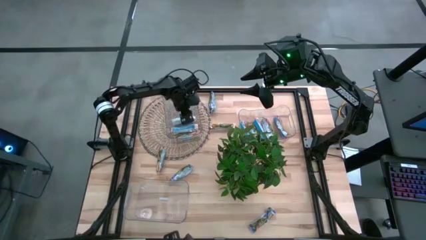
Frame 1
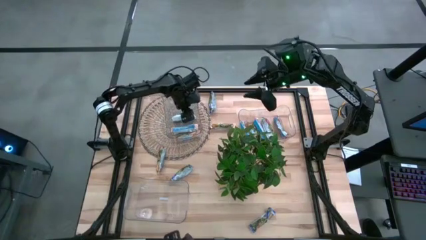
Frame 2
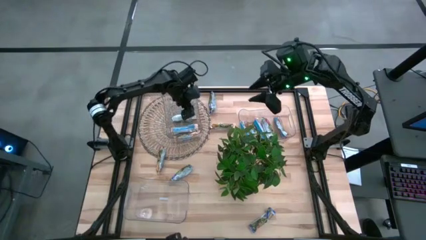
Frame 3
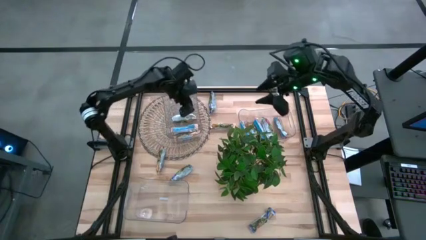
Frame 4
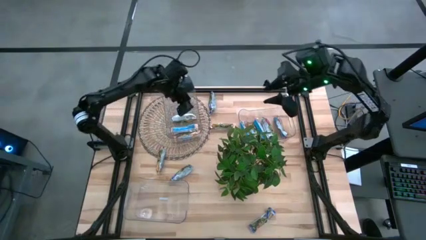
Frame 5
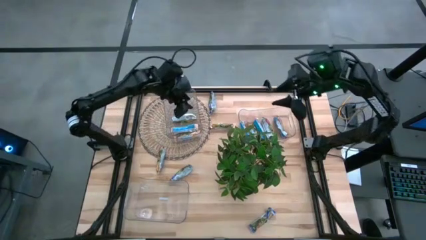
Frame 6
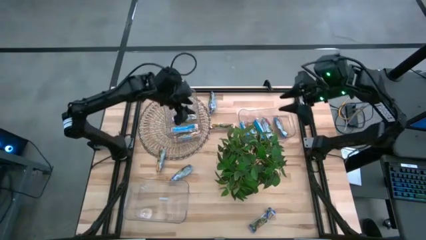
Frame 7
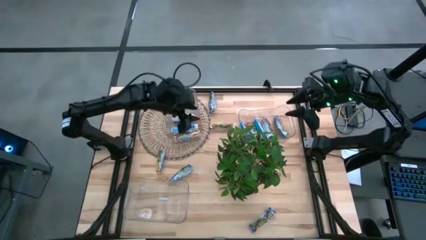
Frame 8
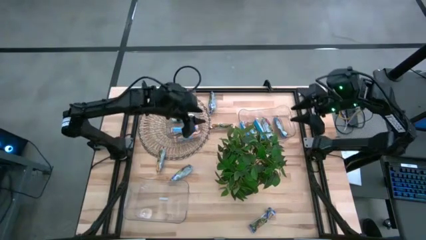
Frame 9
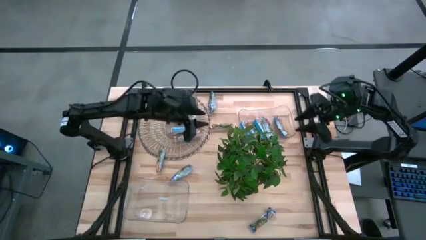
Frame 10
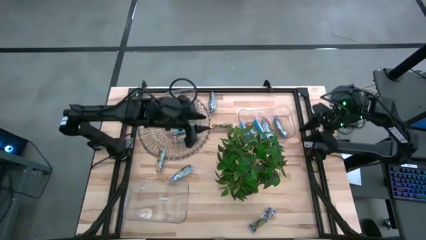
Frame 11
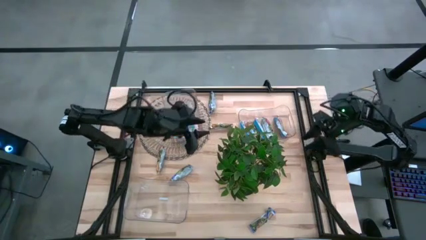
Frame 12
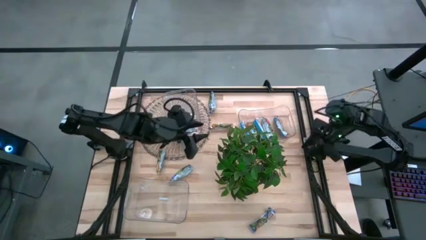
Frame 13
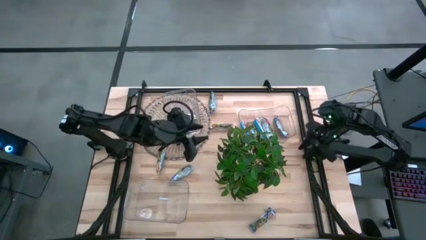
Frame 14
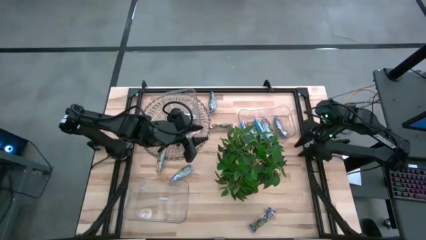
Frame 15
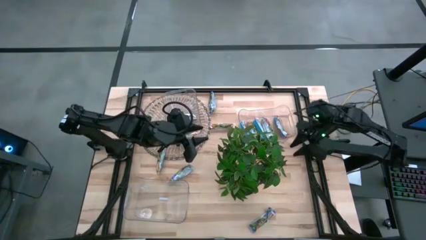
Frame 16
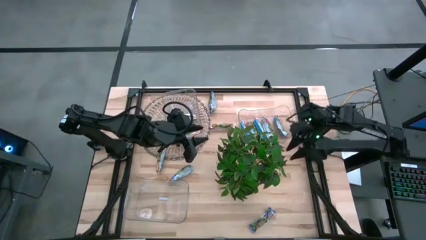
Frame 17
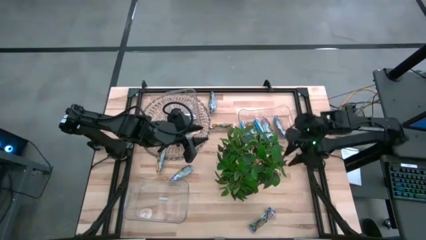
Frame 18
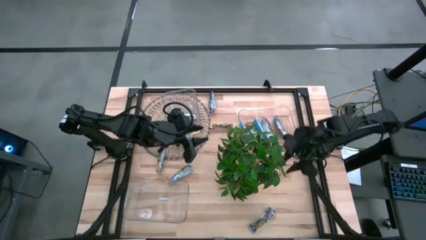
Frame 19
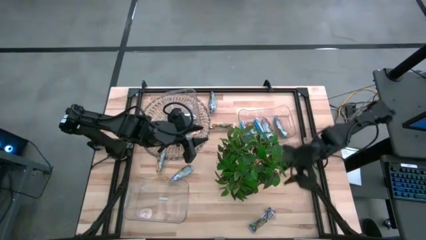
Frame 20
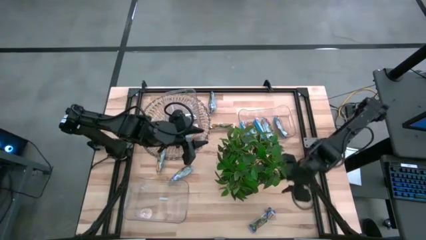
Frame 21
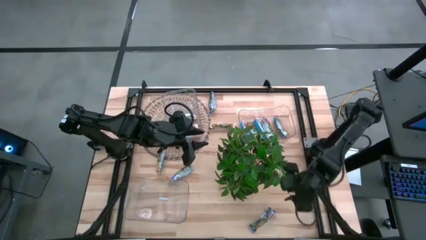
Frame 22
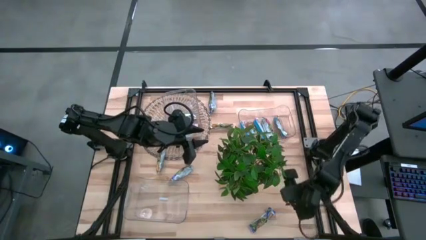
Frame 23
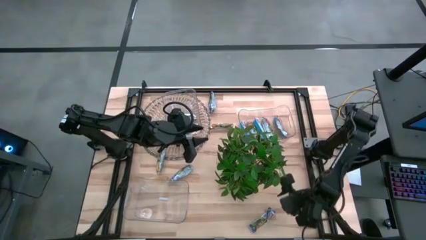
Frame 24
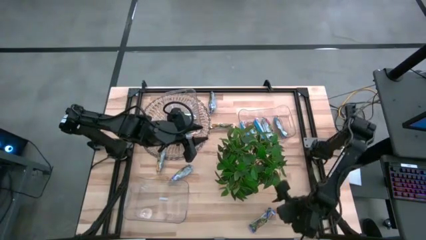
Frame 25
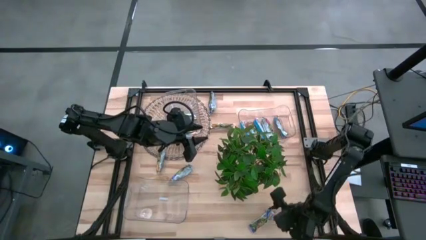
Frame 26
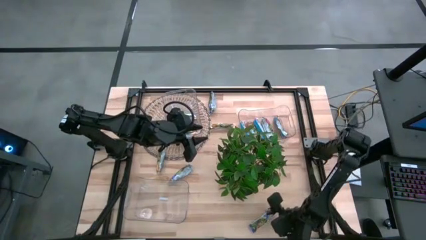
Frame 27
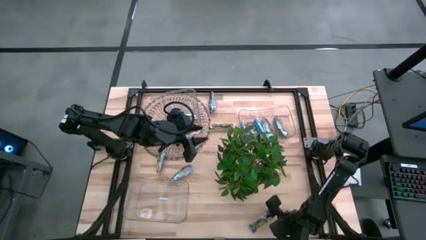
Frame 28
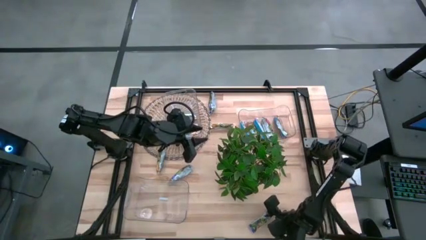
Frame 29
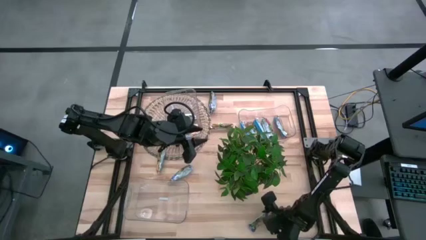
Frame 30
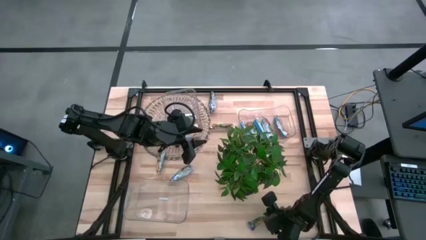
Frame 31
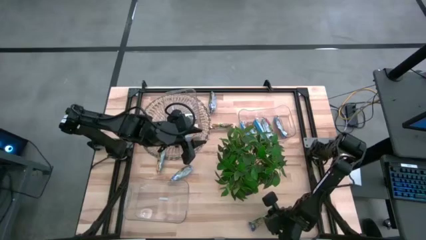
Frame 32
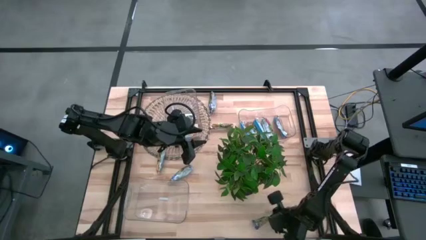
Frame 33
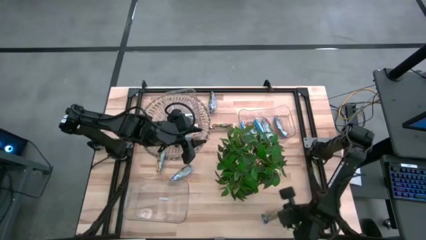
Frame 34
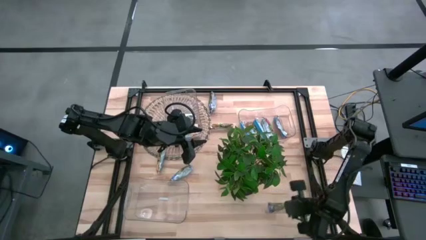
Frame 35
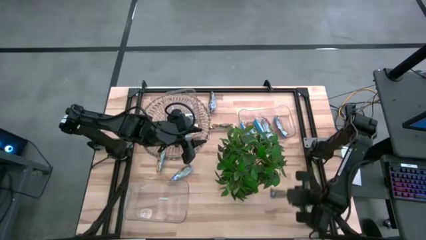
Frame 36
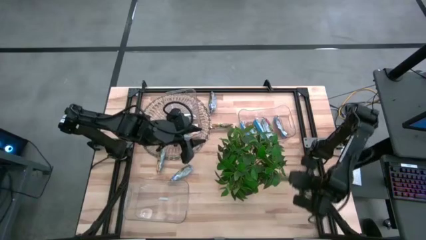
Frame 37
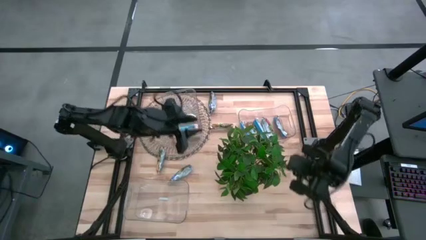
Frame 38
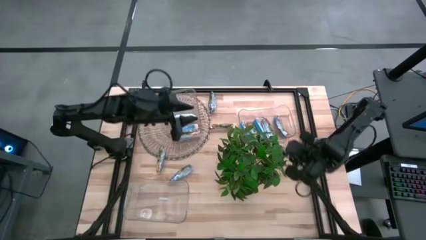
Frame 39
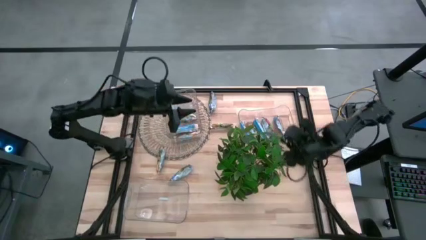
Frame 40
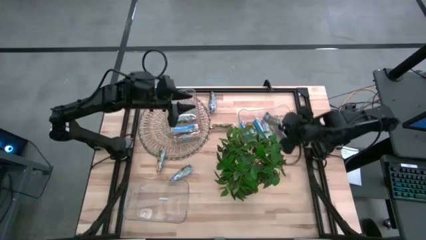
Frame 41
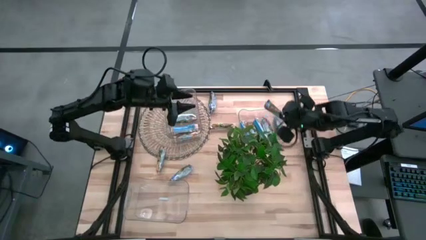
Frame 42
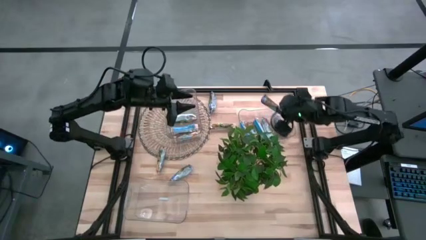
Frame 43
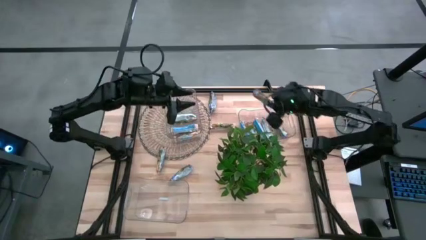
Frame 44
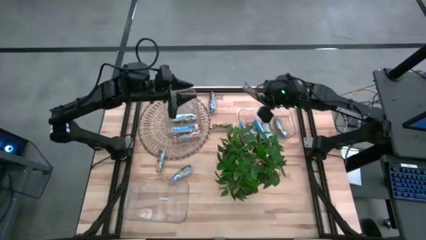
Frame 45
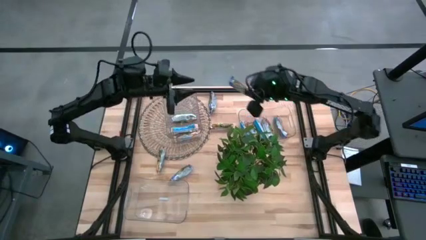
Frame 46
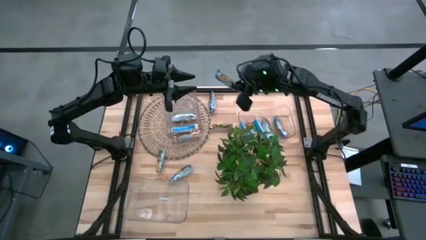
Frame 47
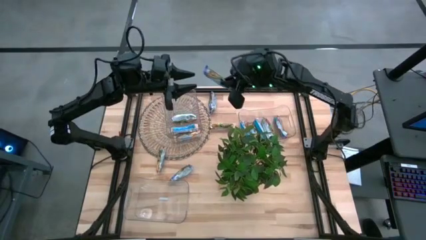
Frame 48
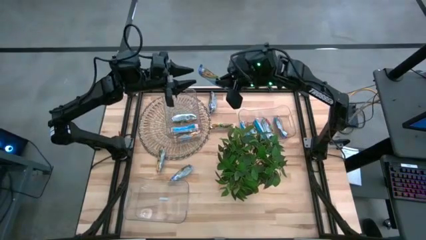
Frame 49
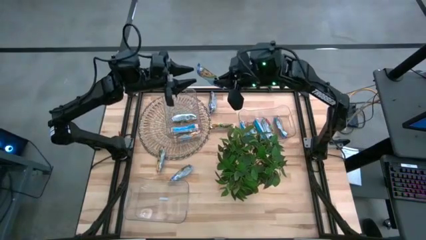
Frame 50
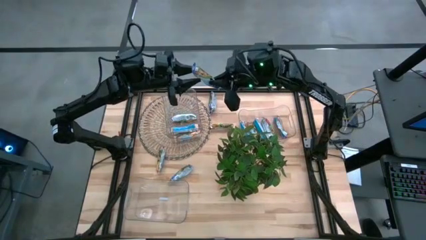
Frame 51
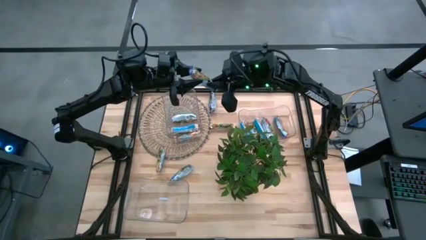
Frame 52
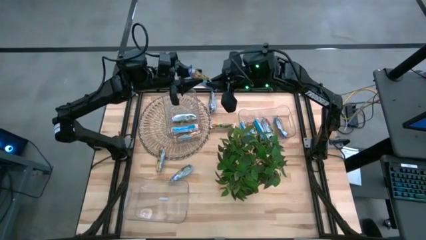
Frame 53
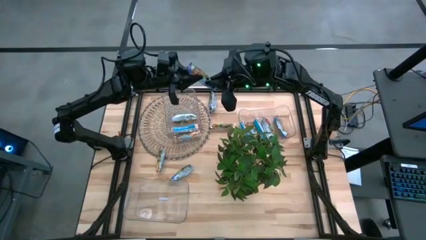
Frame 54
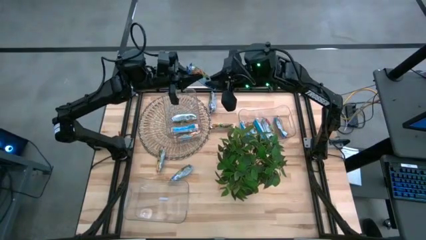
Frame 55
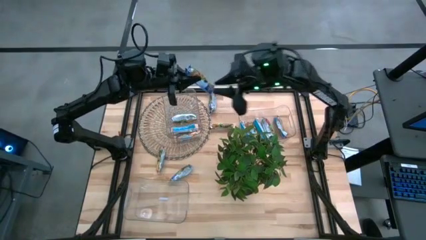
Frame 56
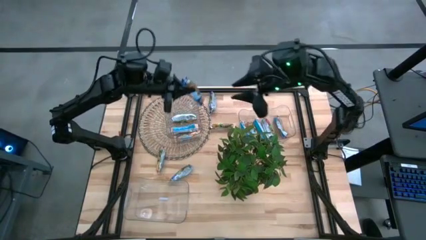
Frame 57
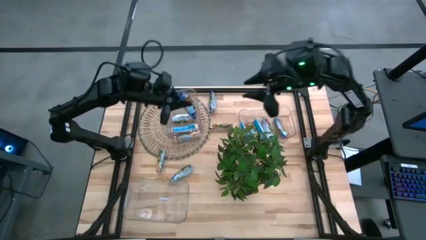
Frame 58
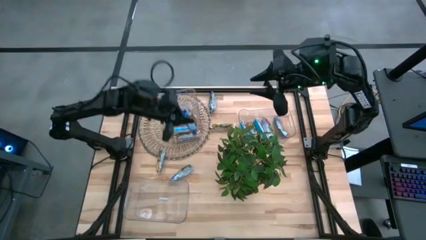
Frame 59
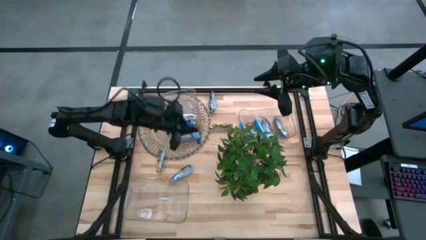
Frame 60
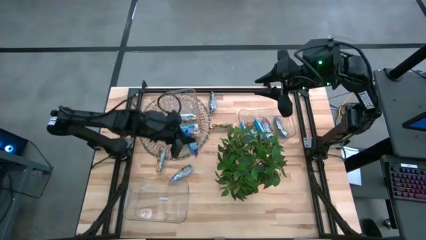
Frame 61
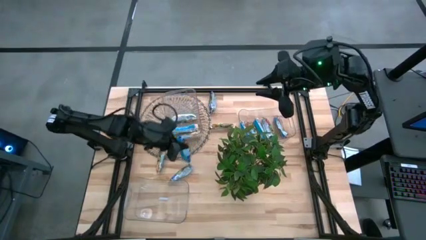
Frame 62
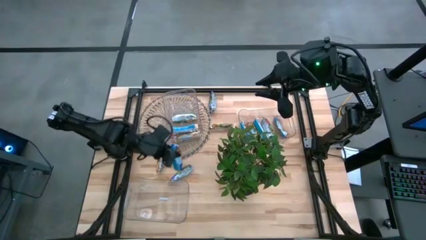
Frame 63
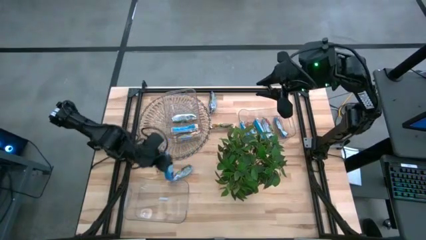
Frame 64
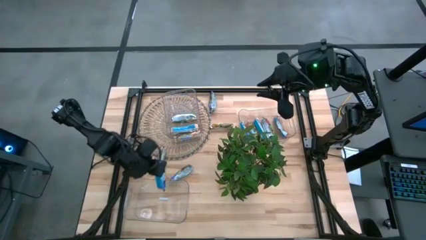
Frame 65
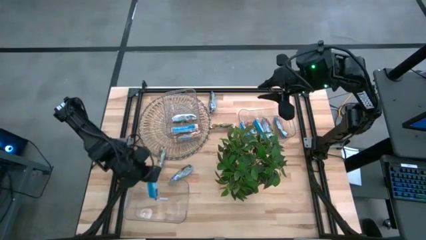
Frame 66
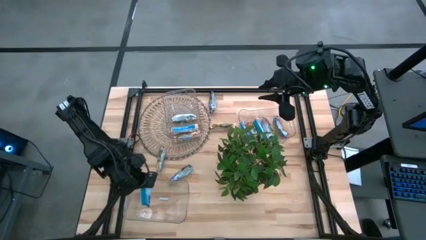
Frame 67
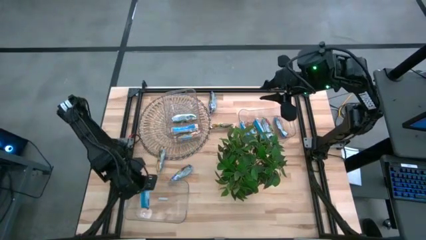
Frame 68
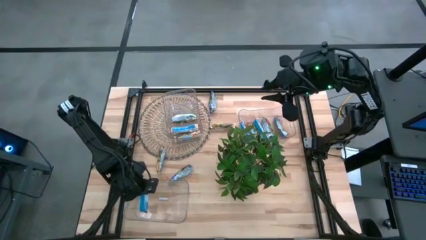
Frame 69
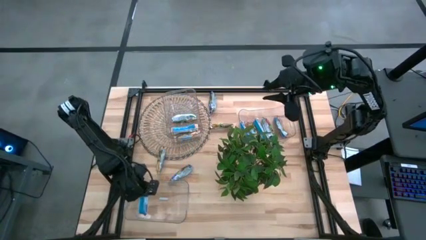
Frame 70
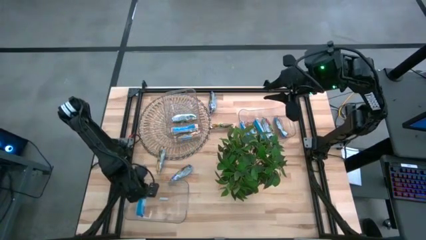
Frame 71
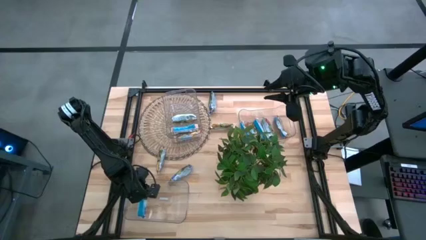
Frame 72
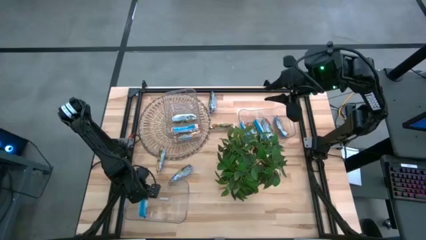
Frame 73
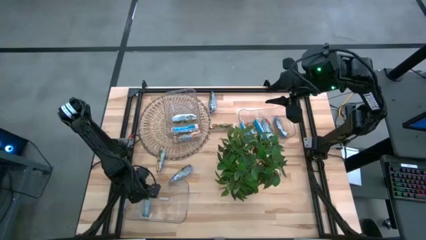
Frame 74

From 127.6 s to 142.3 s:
Task: Pick and place Granola Bars by type
Put the bottom blue granola bar into the bottom left transparent bin

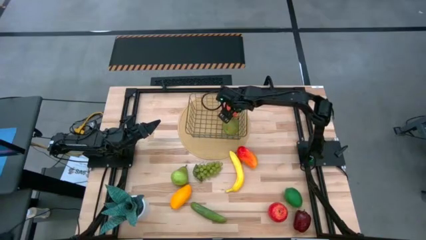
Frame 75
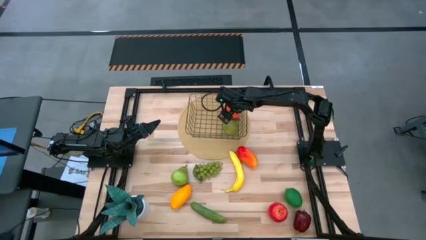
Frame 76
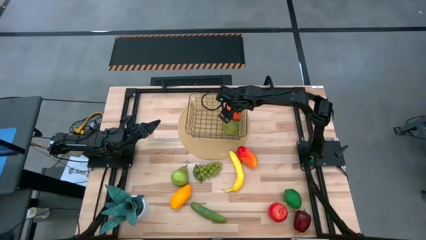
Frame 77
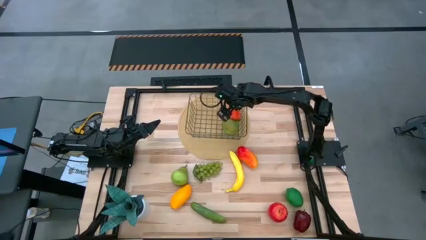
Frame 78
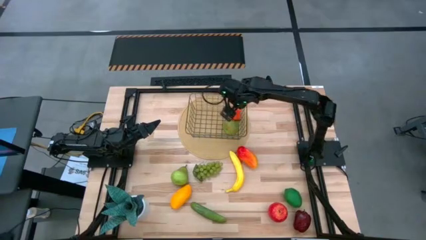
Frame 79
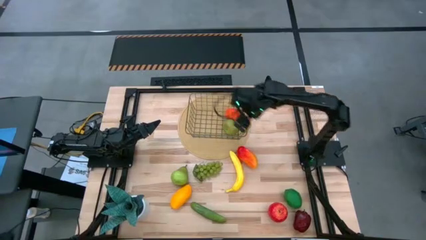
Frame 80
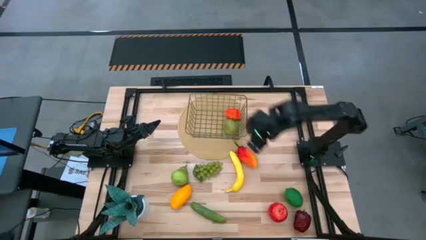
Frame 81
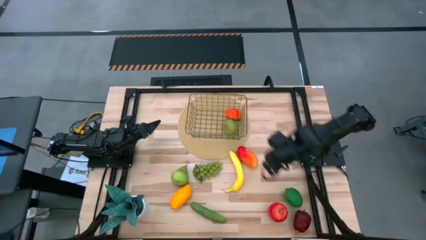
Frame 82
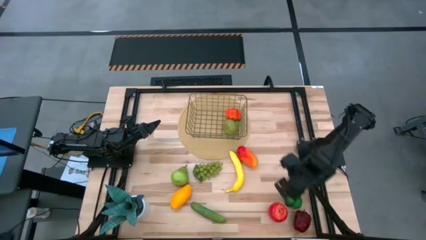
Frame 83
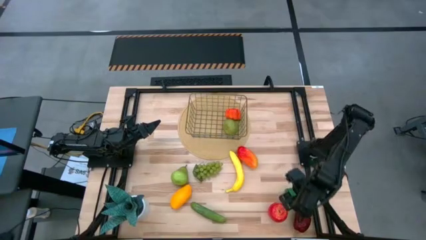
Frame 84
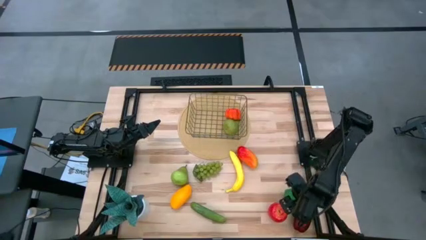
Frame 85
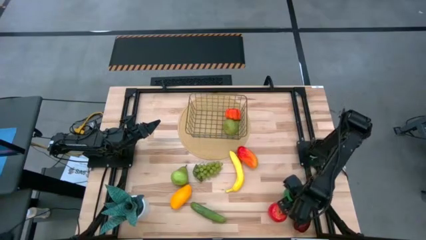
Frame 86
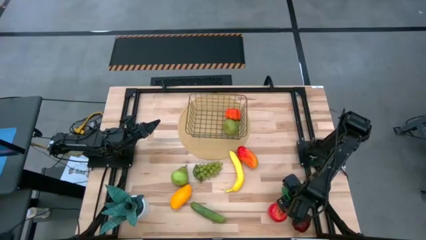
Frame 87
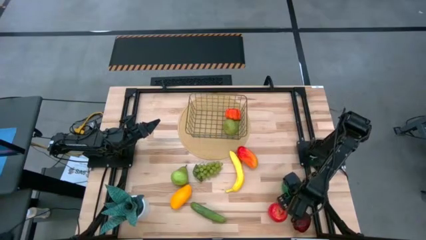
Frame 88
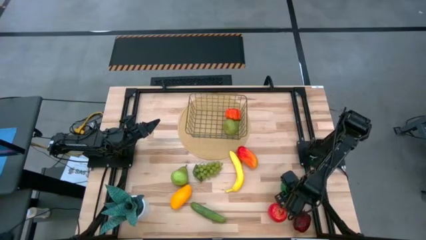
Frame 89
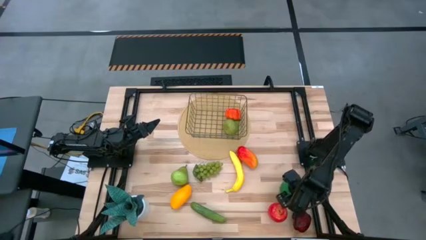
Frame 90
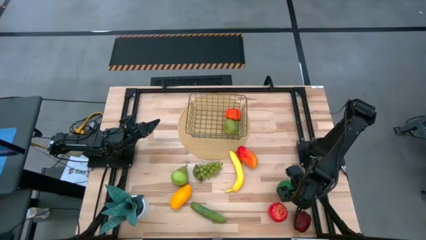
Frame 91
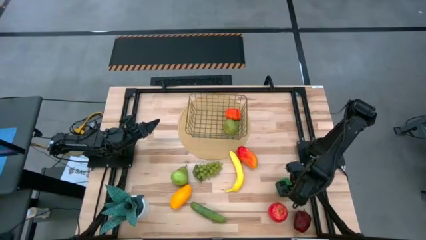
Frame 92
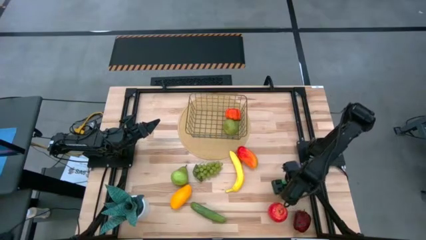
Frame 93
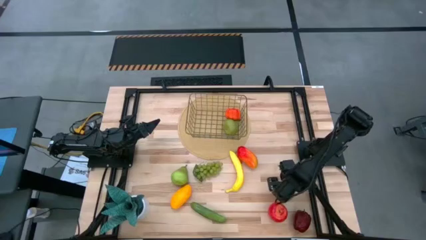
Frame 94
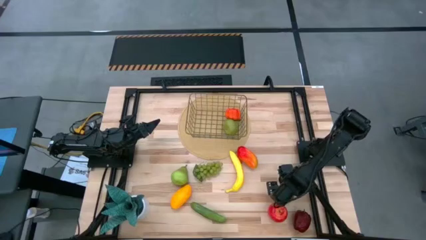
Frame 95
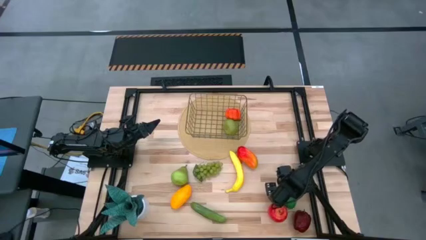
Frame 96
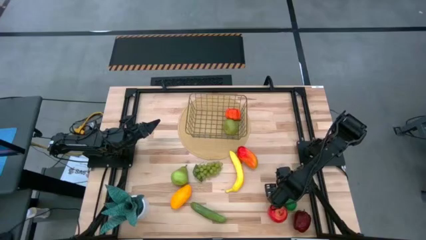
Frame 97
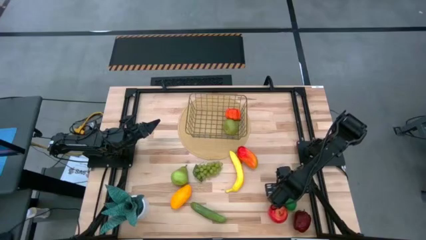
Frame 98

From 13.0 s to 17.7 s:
Task: Build produce basket
Put the green lime into the wire basket
